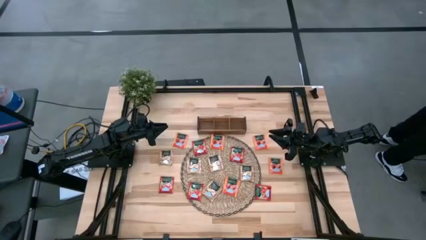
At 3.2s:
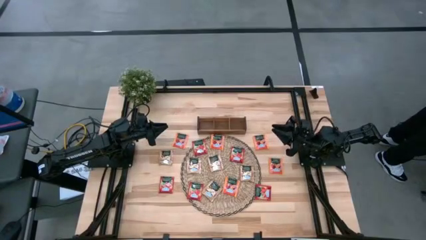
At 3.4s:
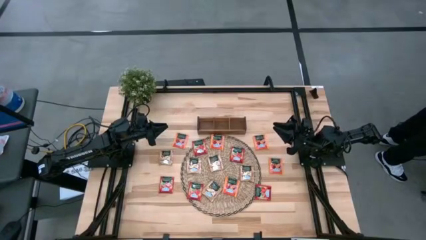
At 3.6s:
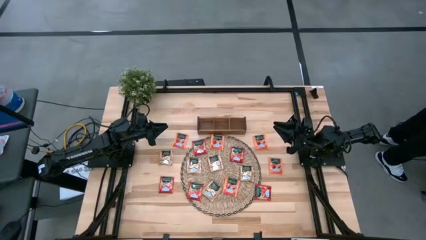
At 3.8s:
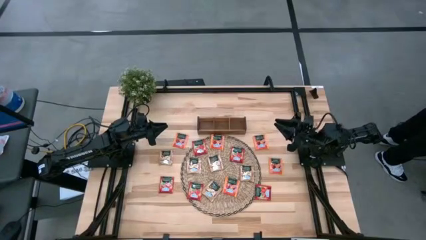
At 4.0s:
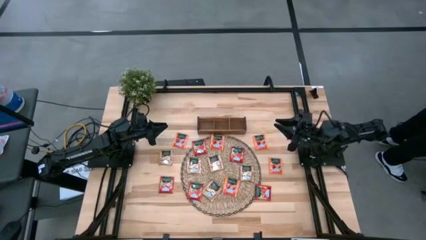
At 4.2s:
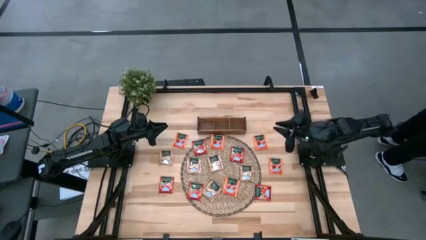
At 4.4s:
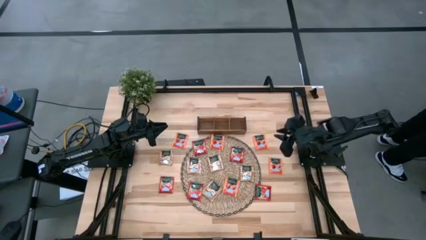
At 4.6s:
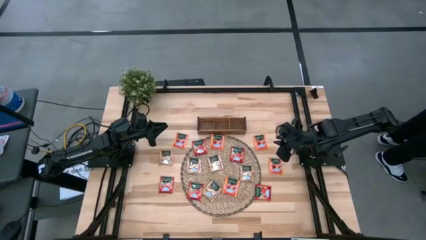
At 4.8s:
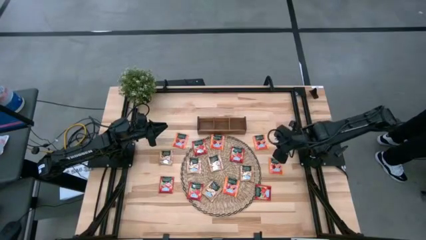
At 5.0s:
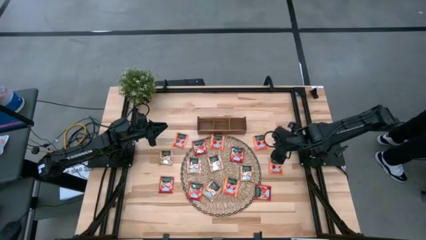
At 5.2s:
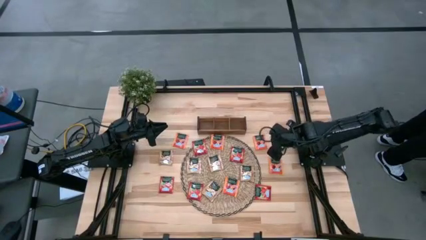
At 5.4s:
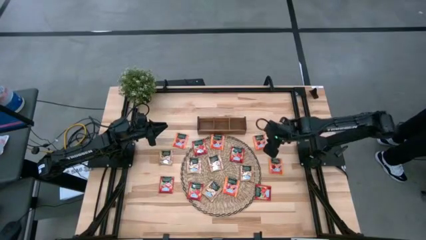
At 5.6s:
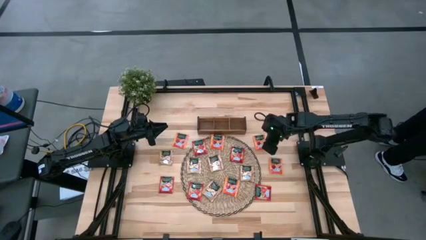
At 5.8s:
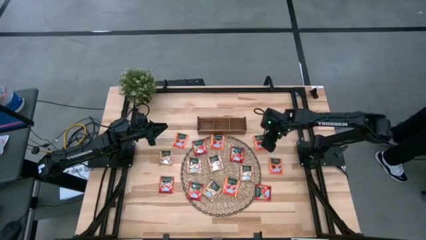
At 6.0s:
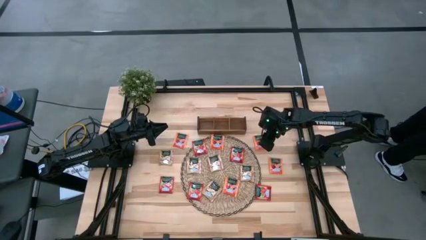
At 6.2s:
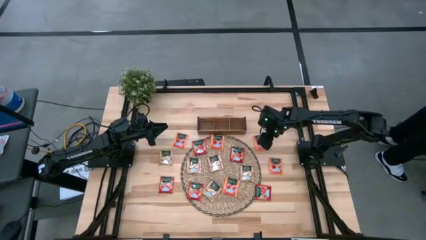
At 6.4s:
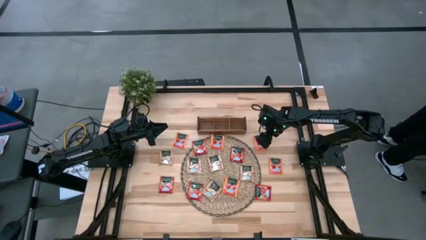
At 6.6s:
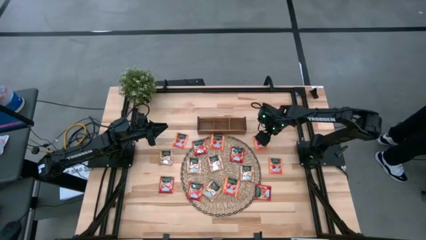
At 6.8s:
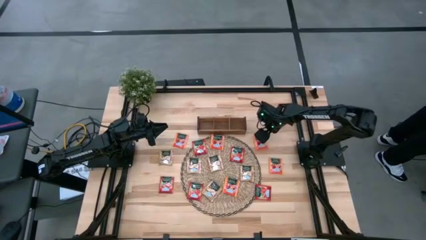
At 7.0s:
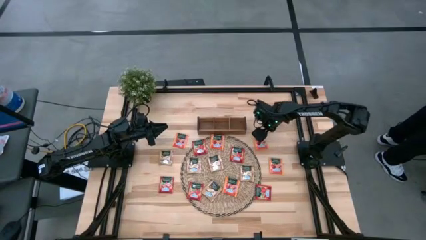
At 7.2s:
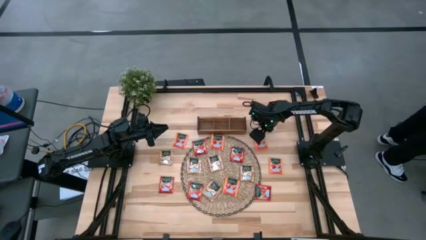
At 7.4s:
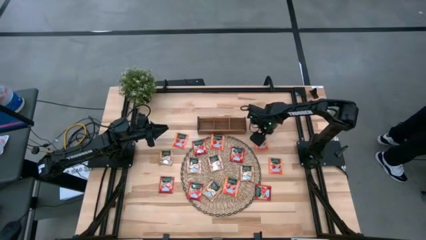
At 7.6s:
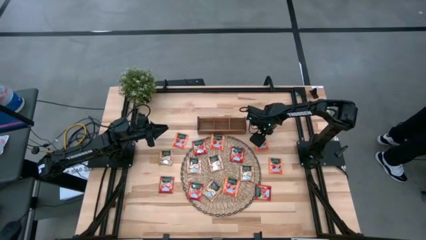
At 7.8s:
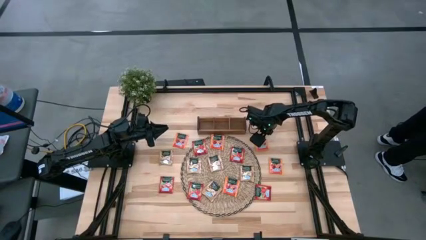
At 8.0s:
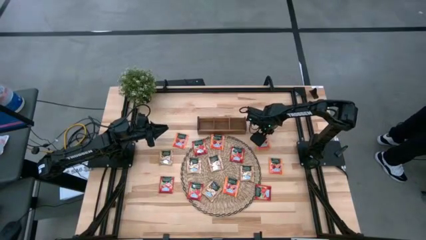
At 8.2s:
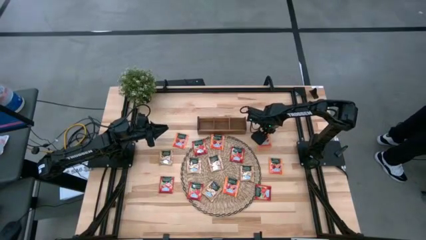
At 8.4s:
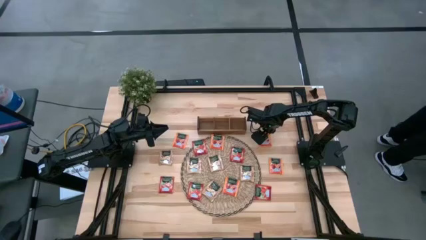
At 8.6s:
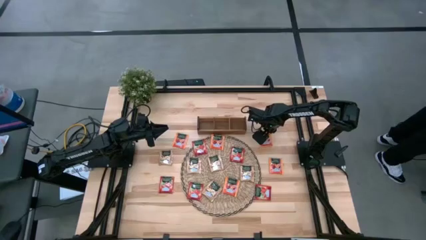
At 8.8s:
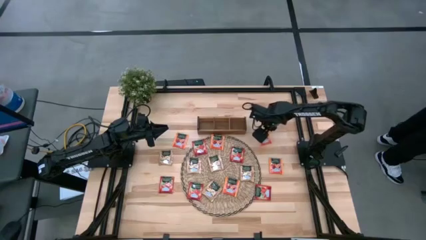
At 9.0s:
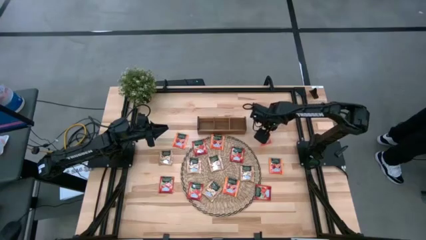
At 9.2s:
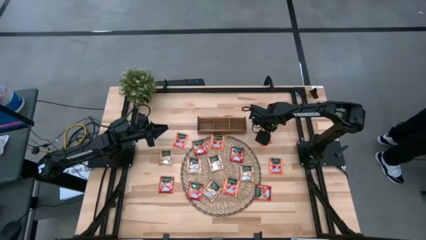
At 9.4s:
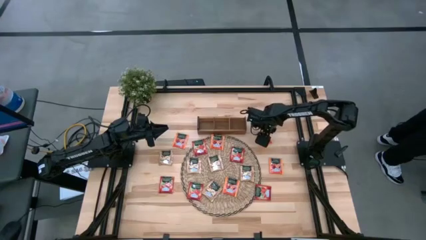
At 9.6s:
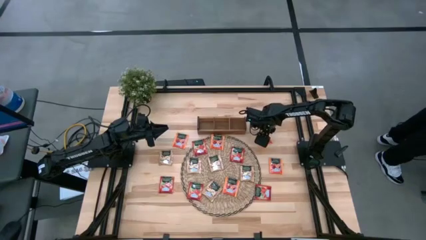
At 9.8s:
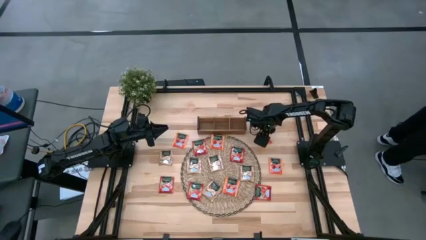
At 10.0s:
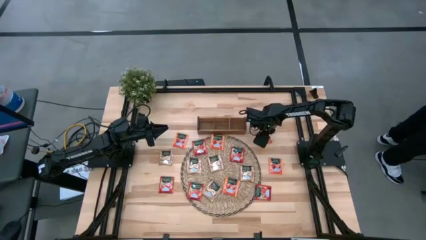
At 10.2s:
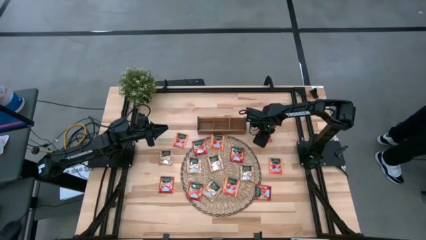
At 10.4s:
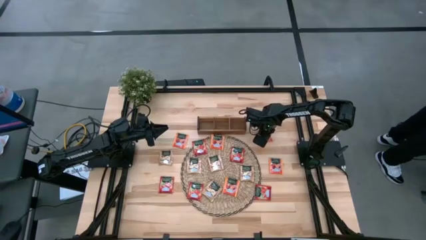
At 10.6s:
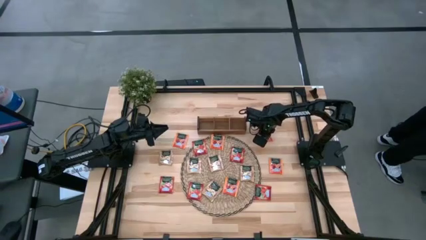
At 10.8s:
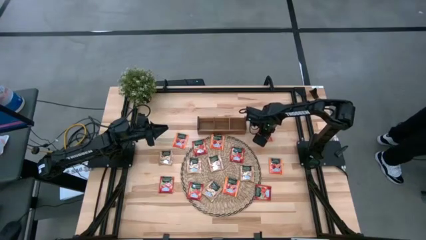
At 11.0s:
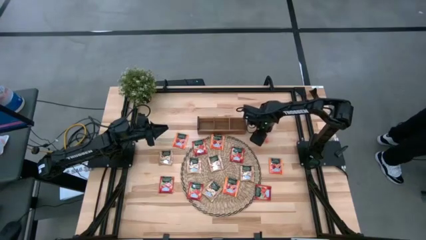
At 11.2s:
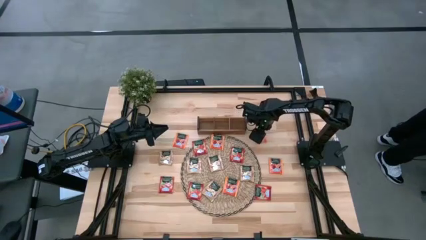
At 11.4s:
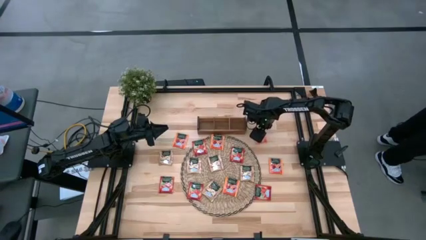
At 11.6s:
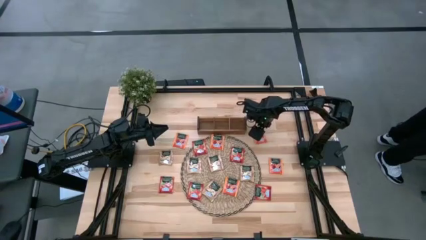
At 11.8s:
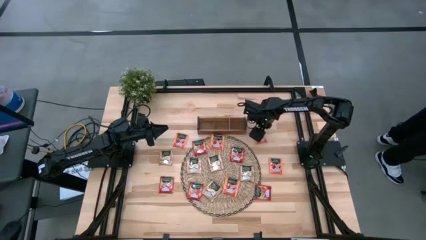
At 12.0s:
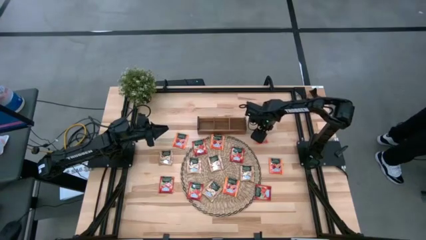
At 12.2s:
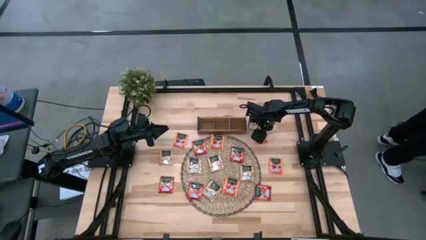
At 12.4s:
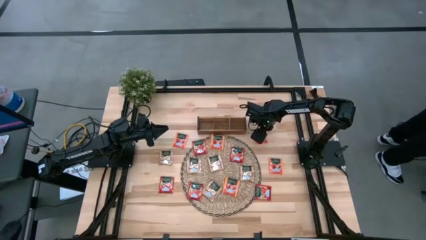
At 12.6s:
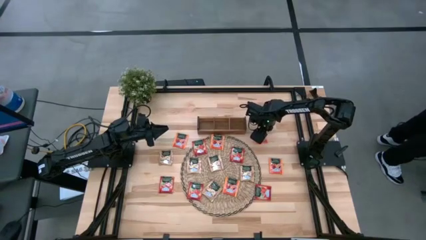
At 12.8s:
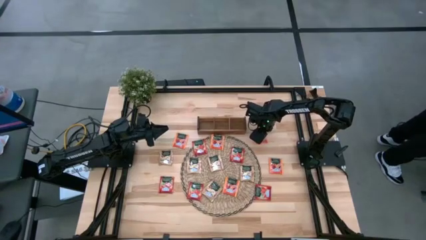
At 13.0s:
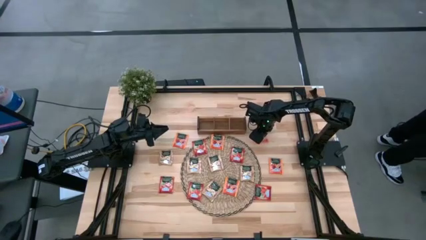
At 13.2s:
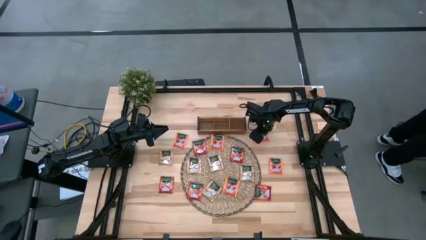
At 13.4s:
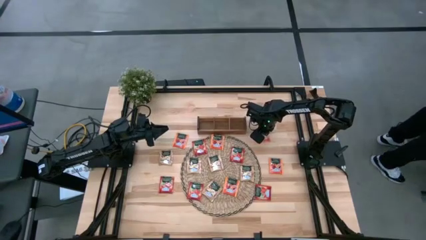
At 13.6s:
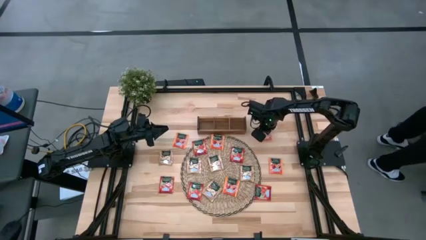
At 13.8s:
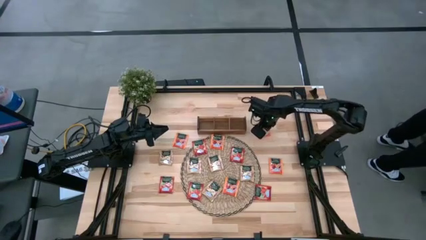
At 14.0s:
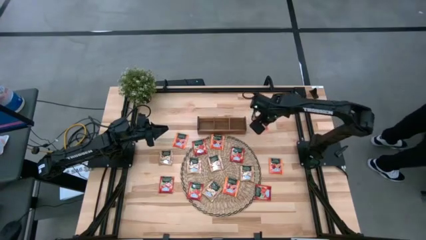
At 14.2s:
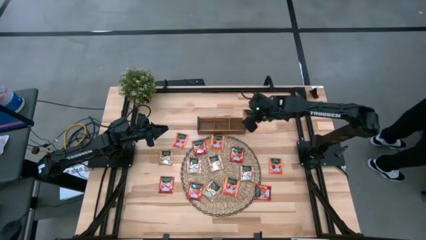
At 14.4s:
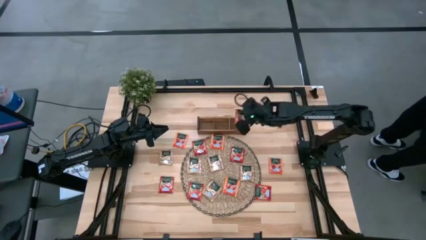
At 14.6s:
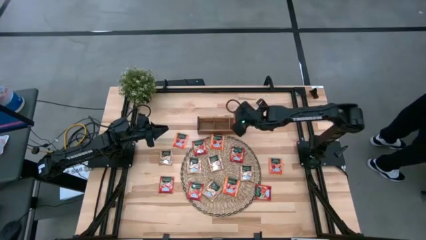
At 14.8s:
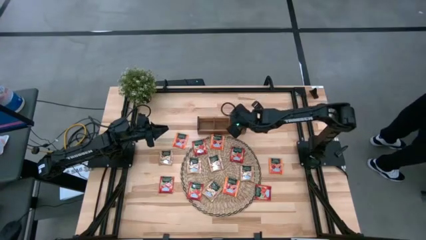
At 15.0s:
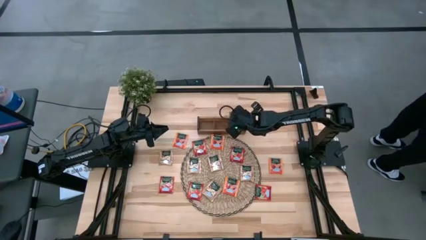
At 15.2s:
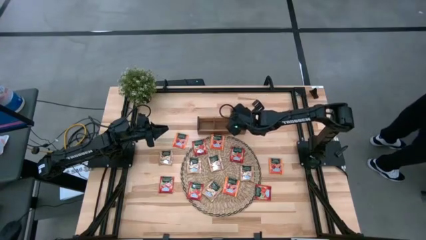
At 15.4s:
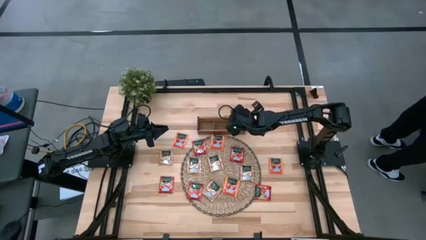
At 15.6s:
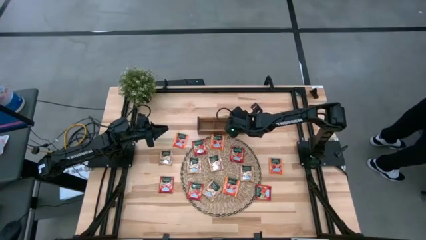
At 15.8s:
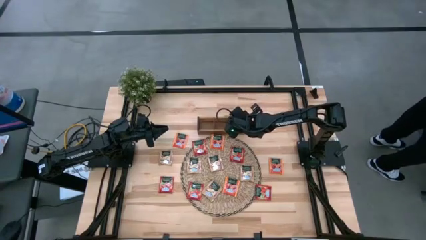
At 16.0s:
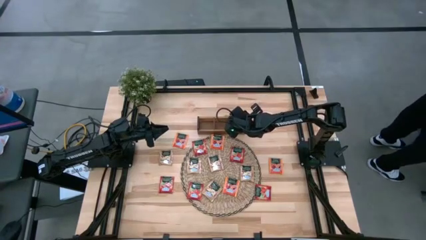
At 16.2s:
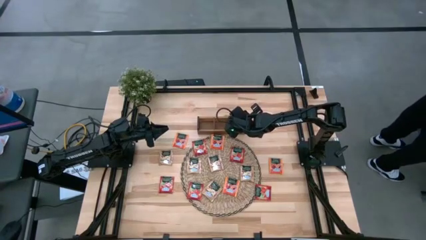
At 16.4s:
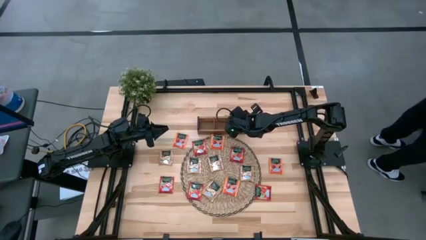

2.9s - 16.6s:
Task: Pick & Place Tea
Put the orange tea bag to the right of the wooden organizer
